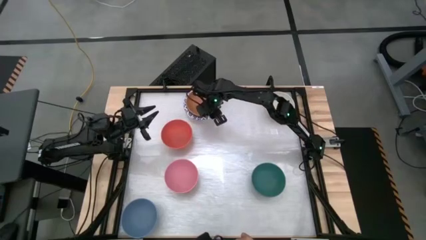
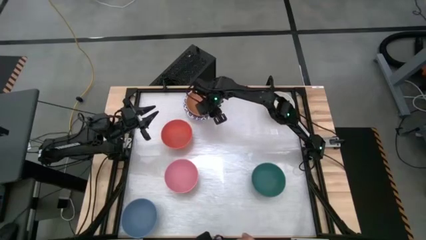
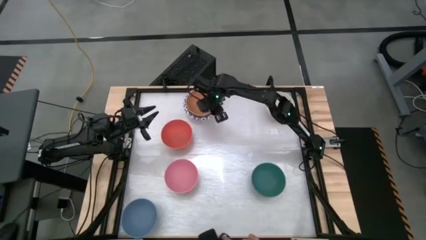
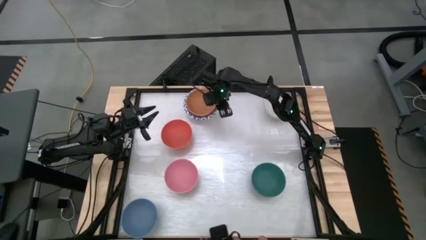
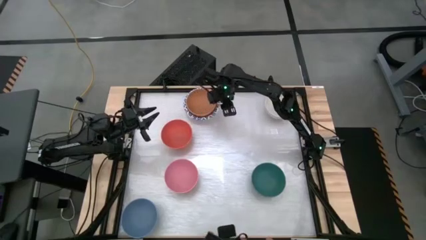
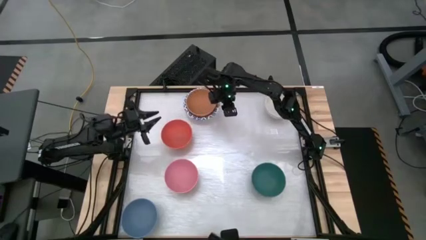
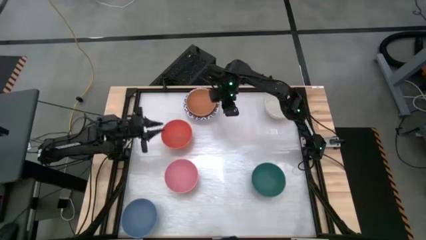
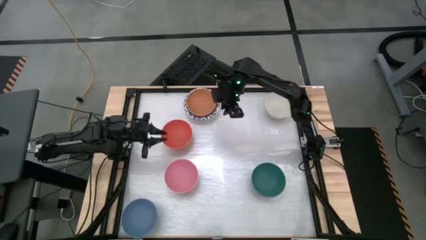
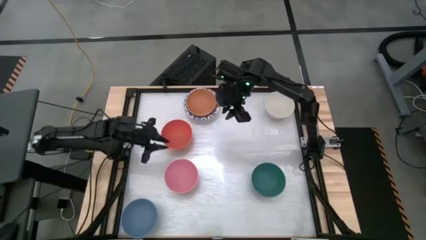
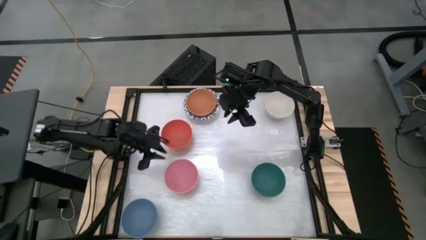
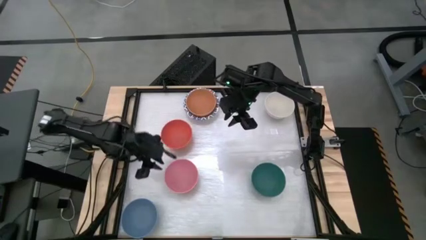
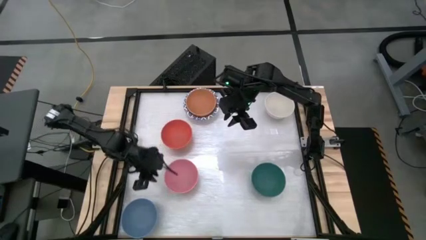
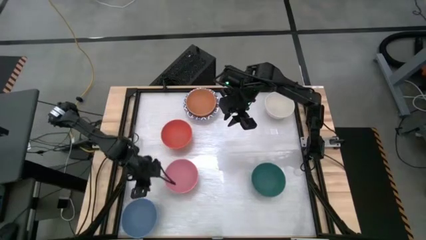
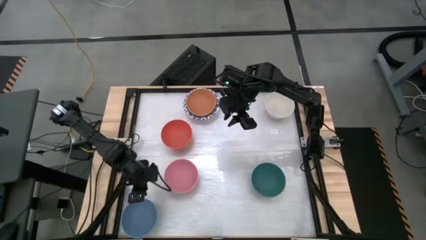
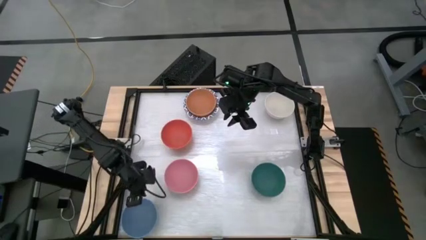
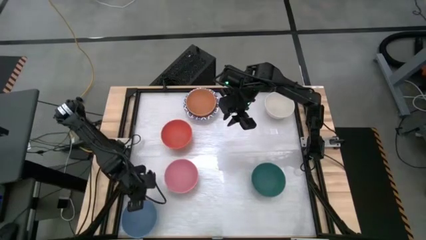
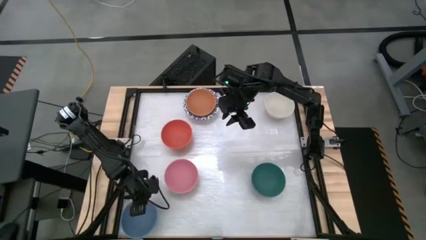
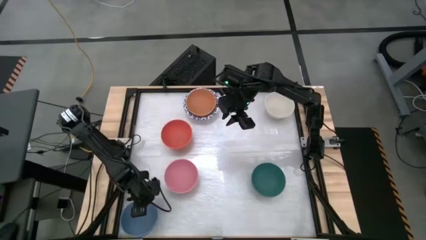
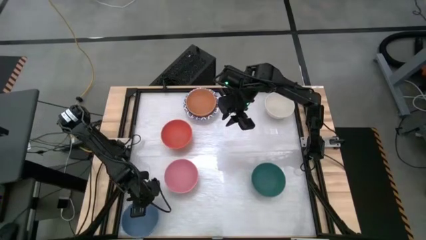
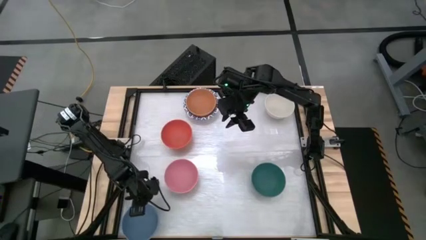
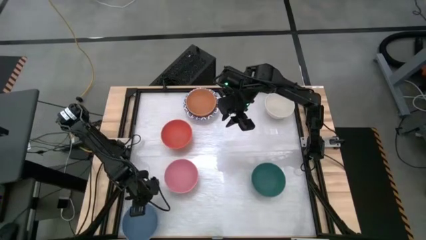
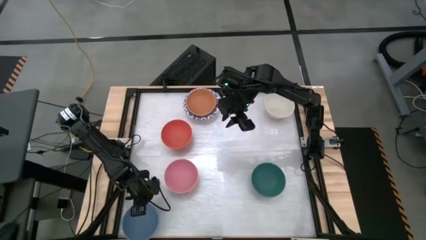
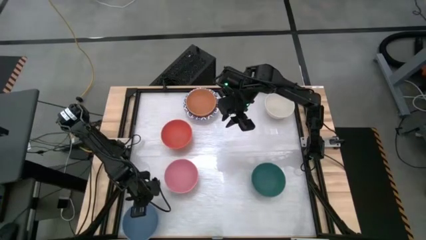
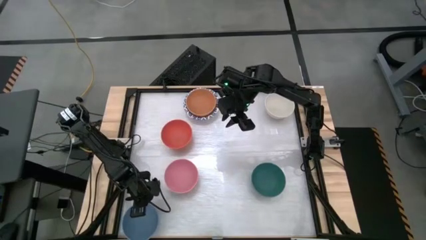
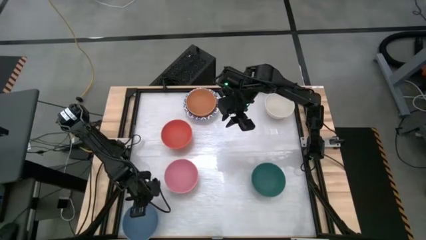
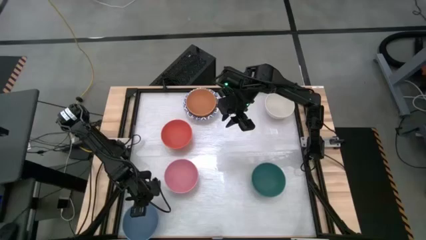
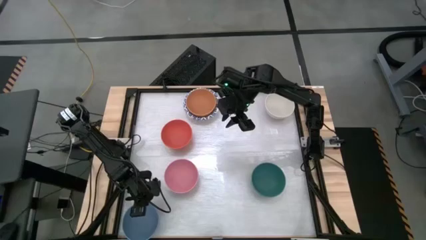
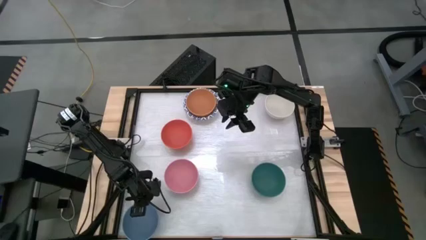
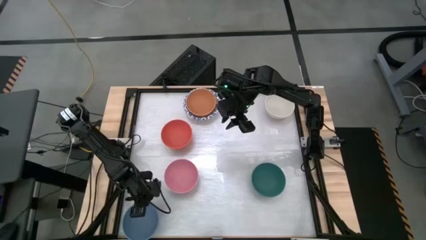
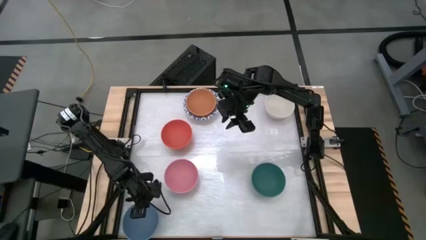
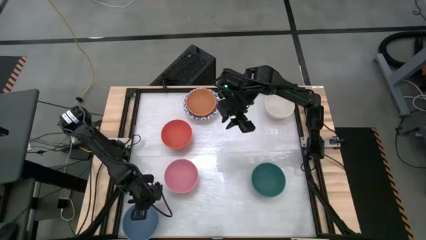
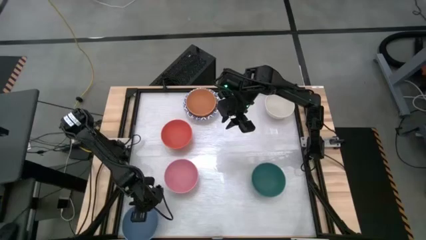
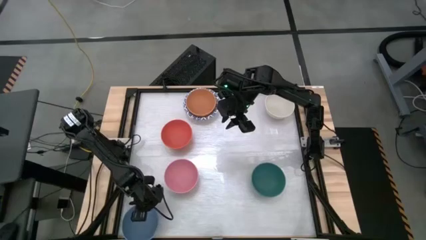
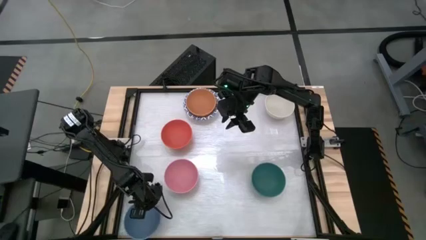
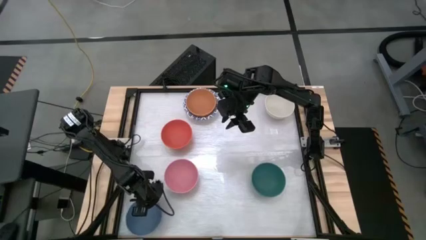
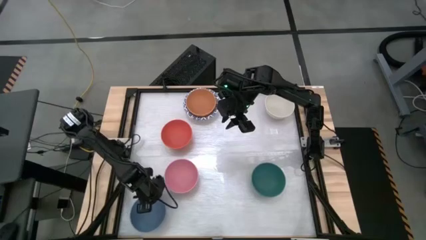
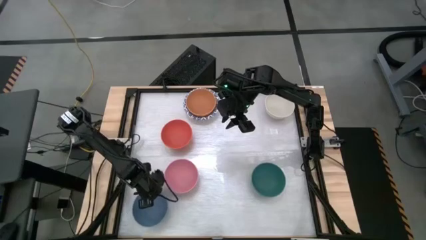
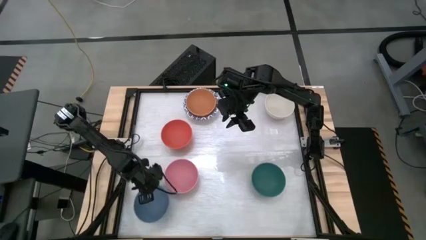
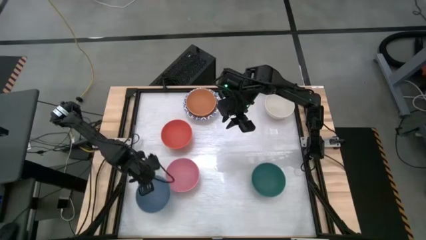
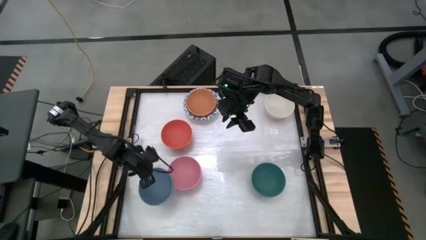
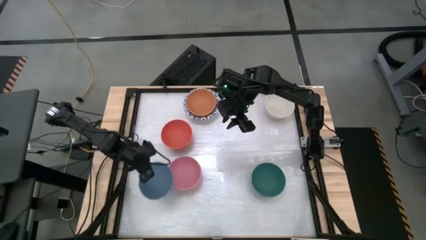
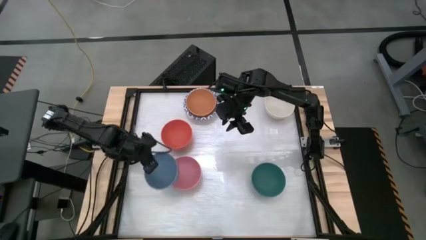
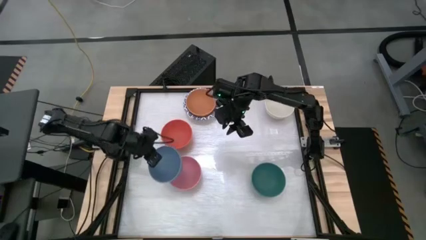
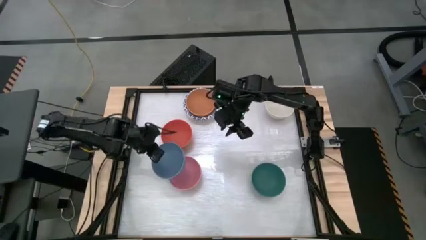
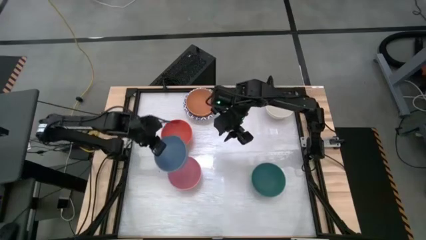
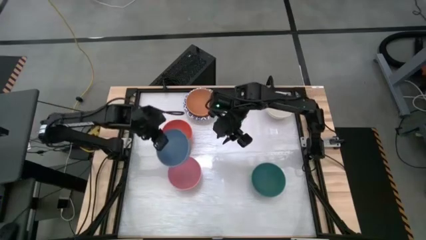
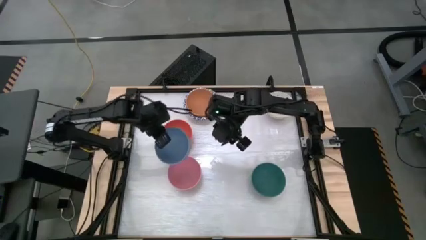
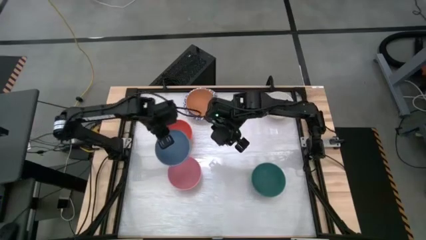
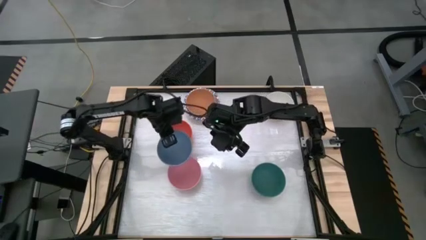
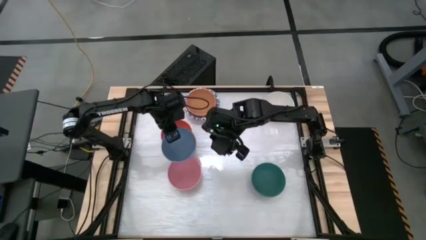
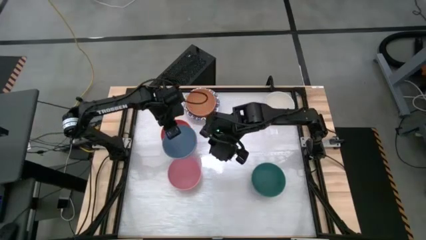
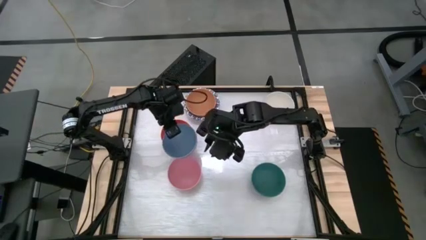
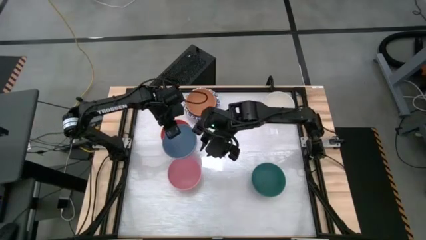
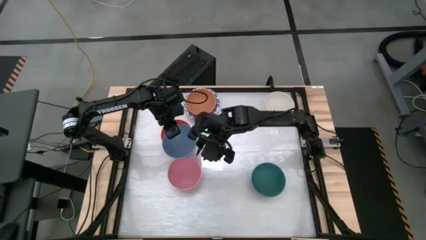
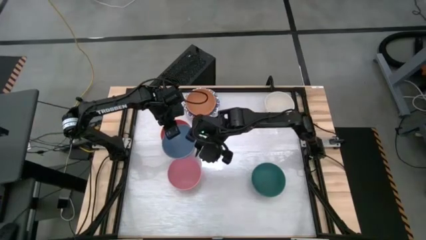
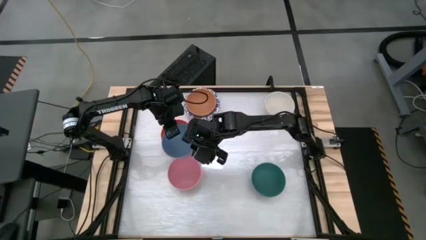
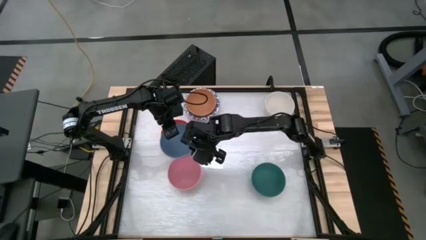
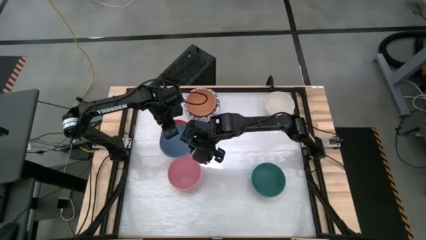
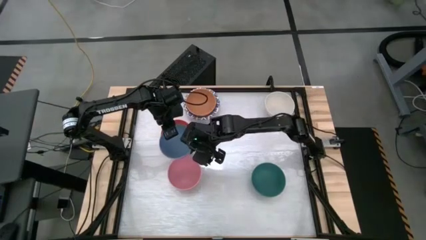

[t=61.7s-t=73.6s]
Stack the blue bowl onto the stack of bowls
